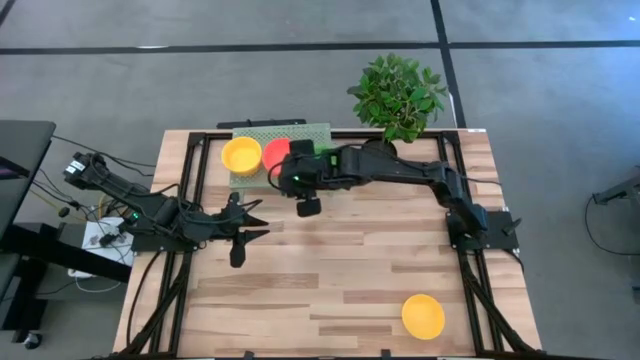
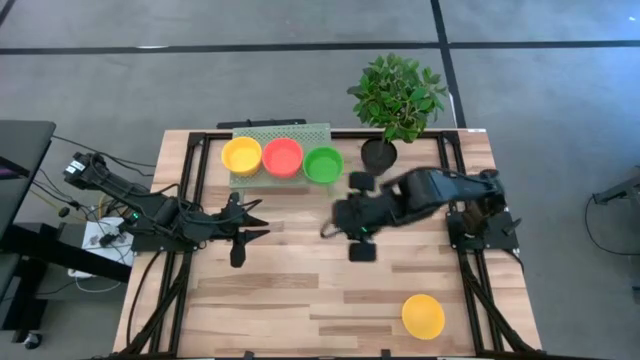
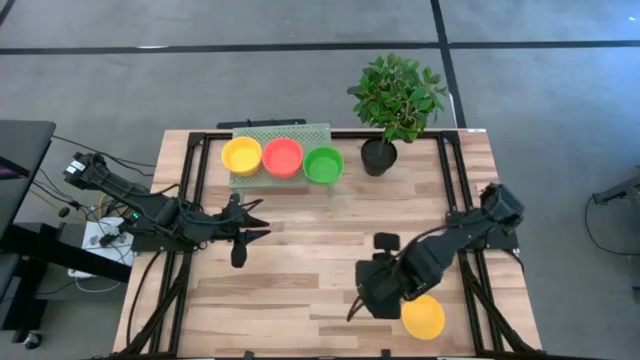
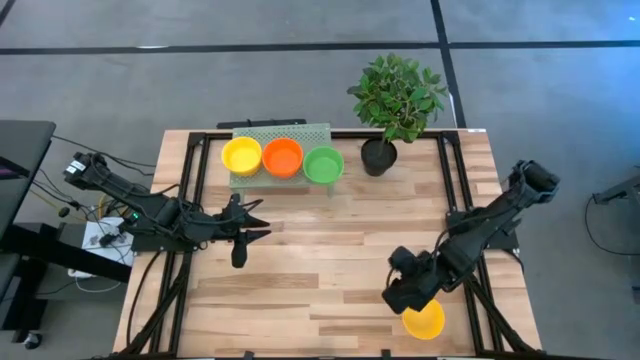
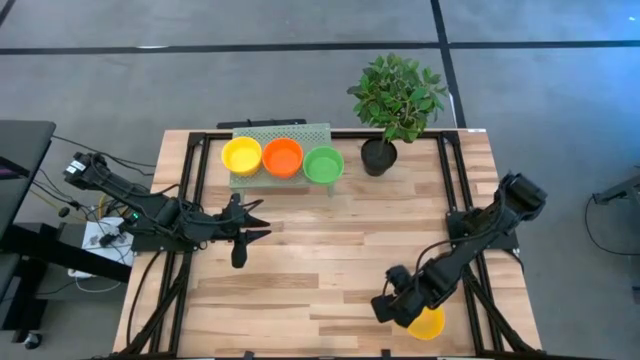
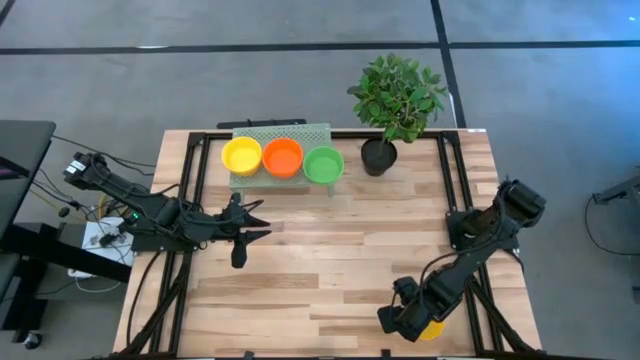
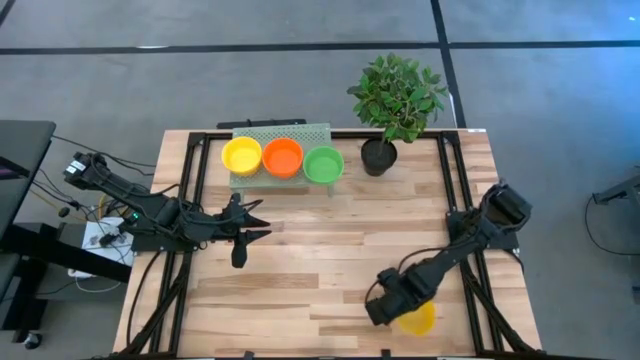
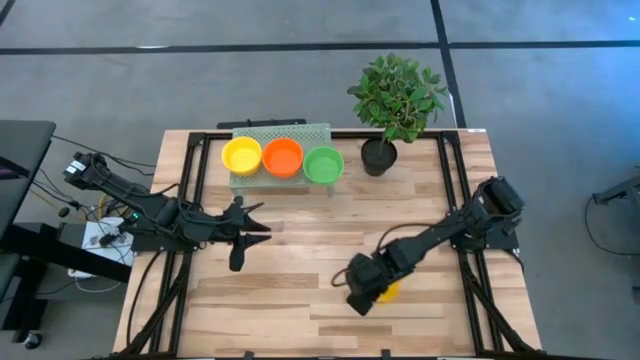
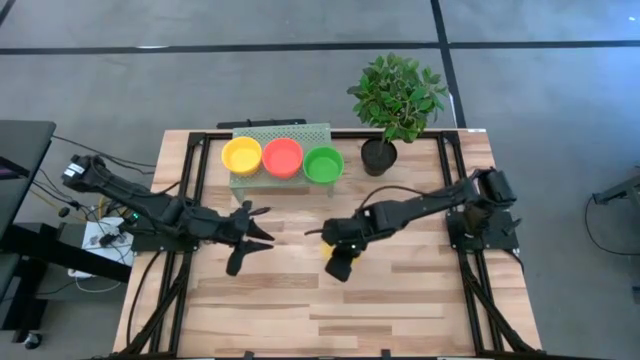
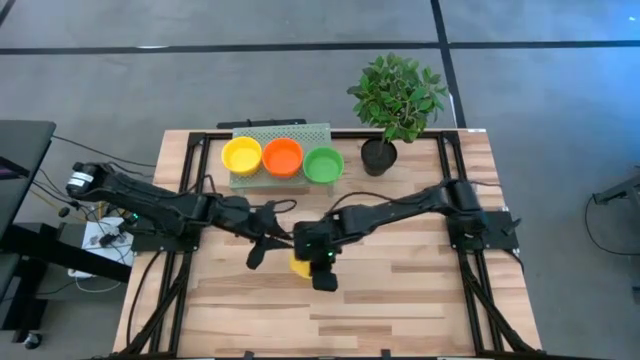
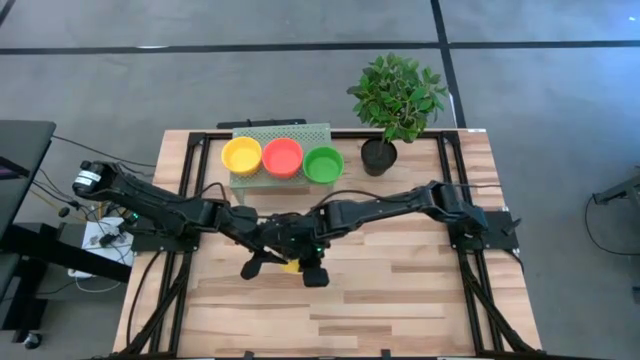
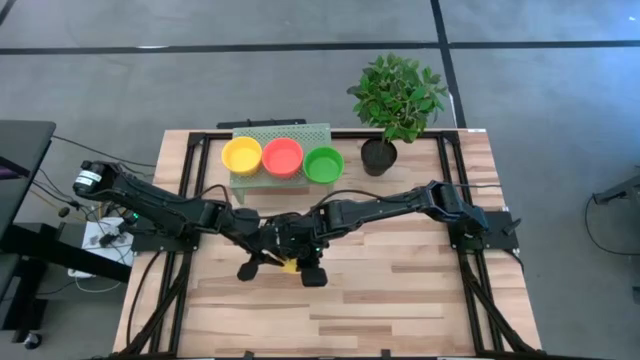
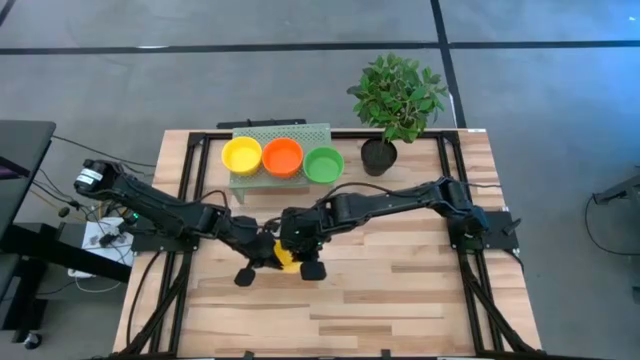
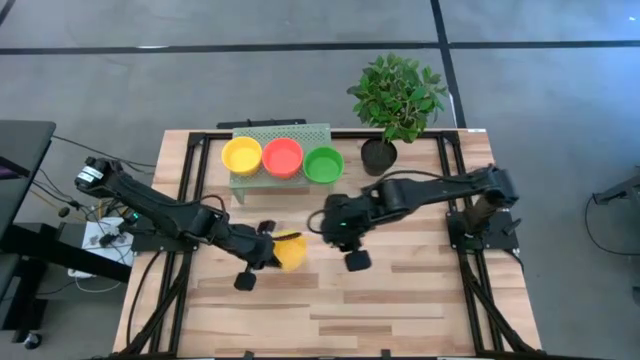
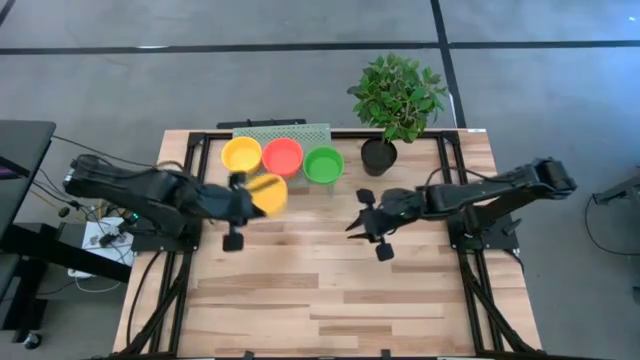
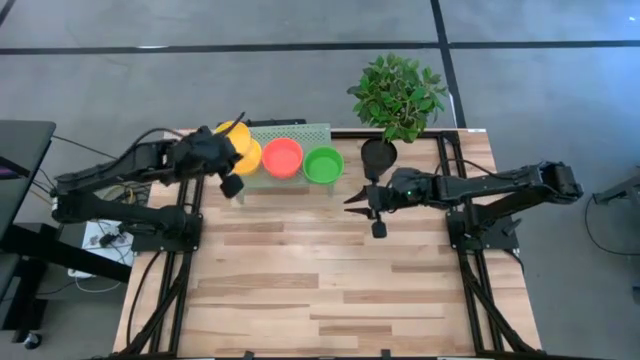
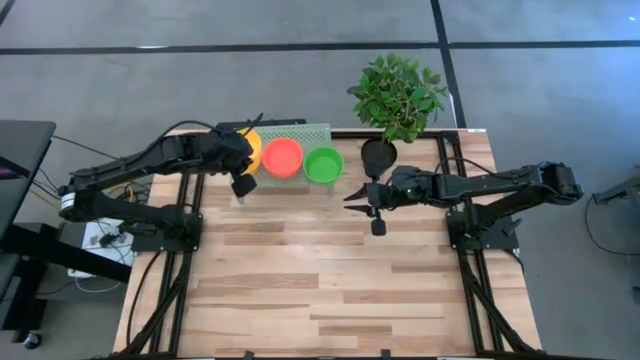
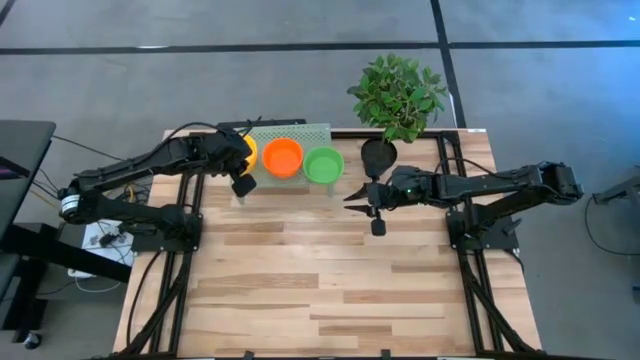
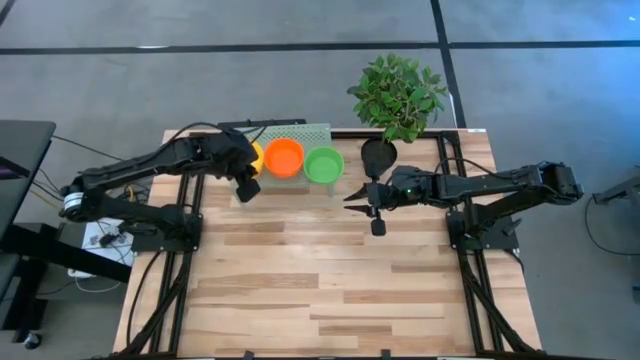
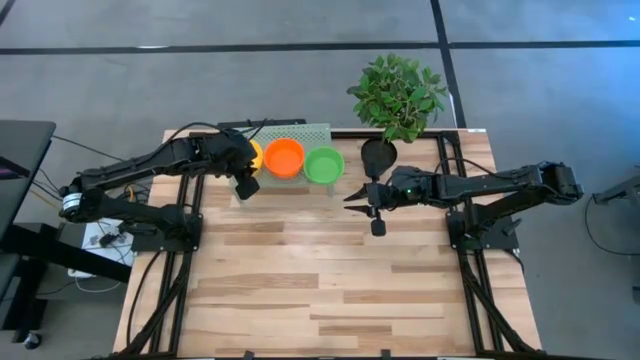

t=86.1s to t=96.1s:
Task: Pick & Place Mini bowls
Stack the yellow bowl on top of the yellow bowl on the shelf

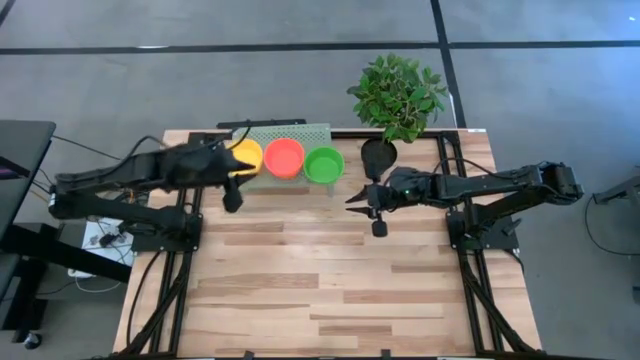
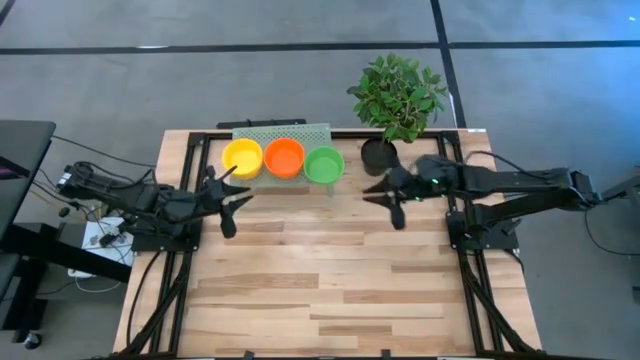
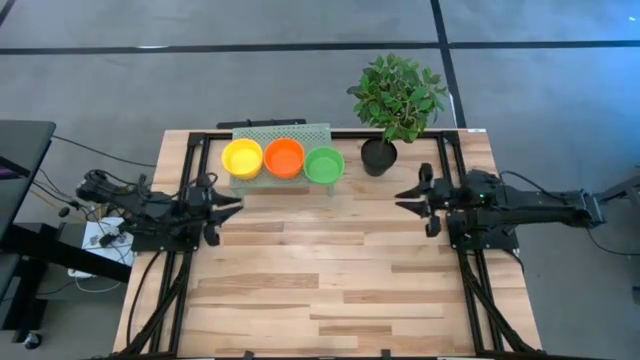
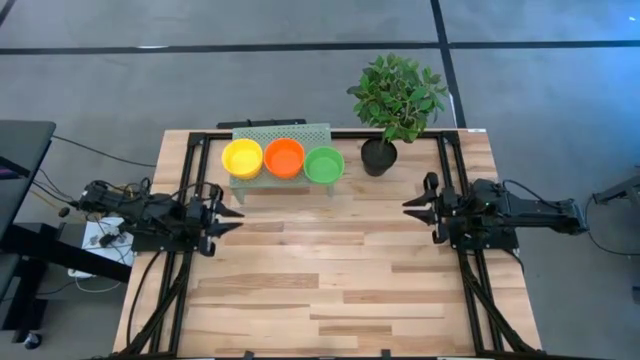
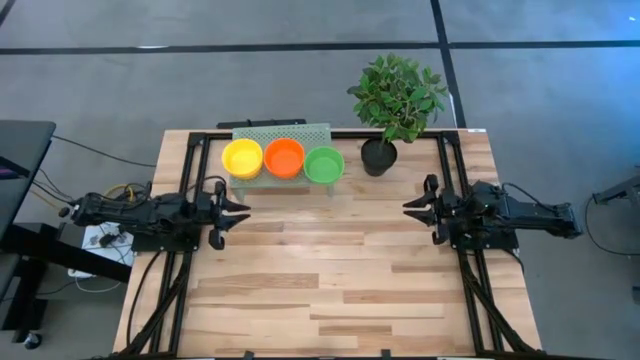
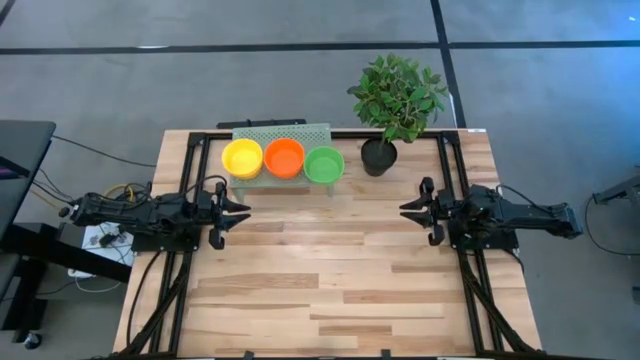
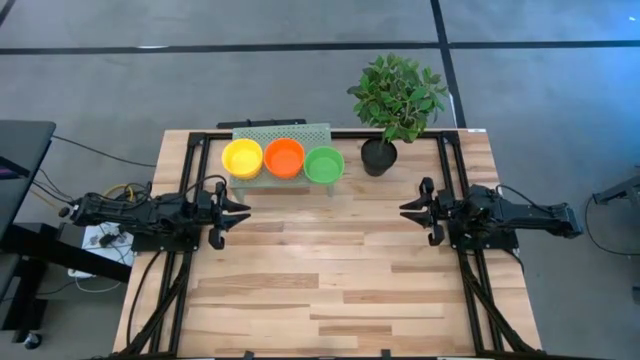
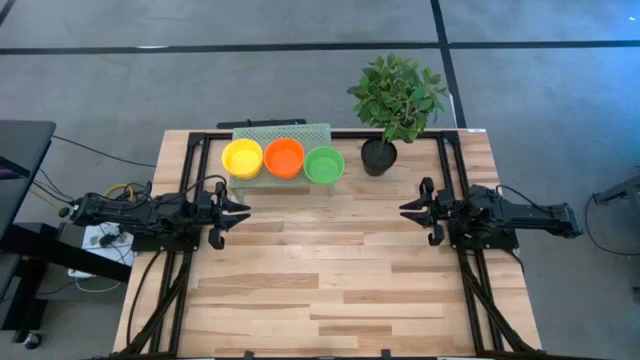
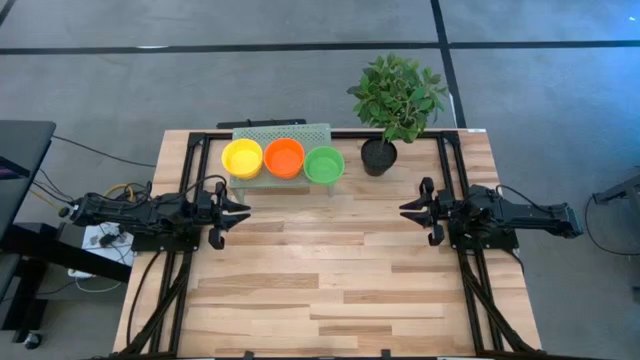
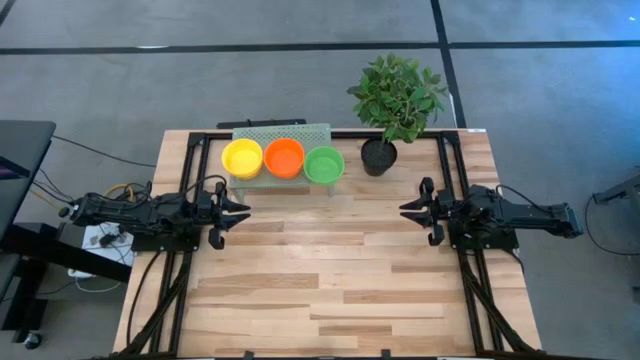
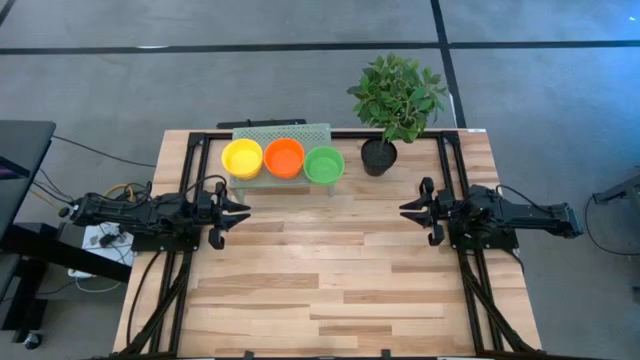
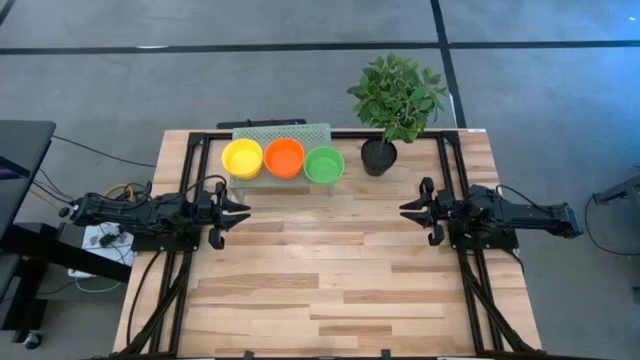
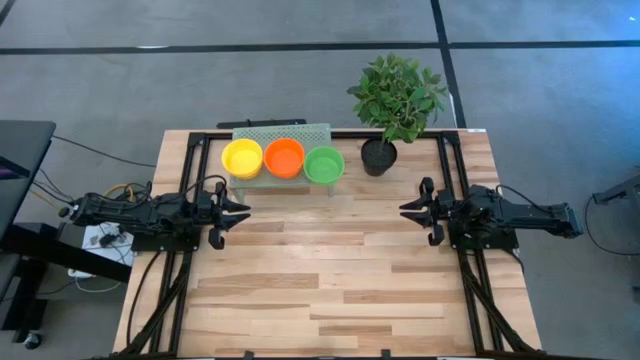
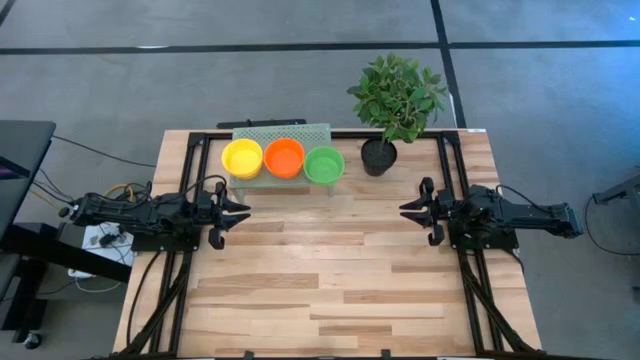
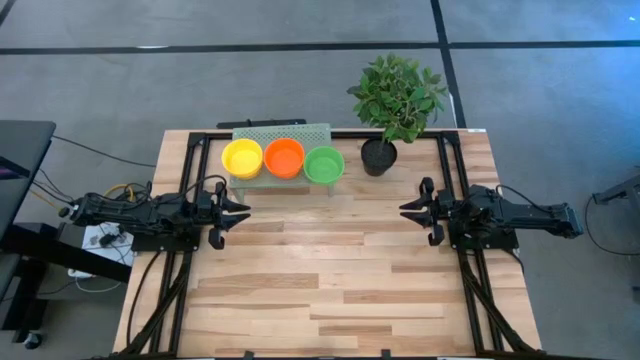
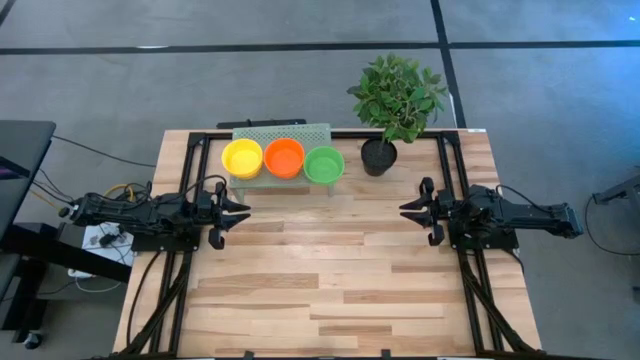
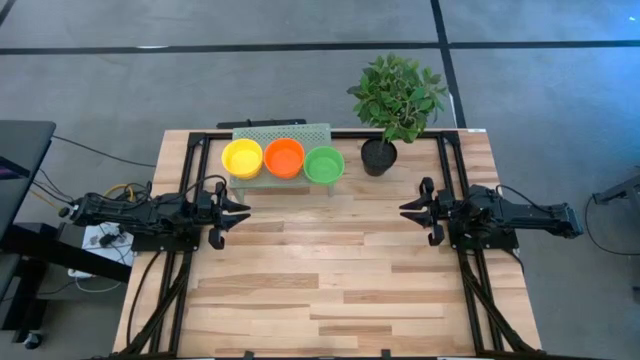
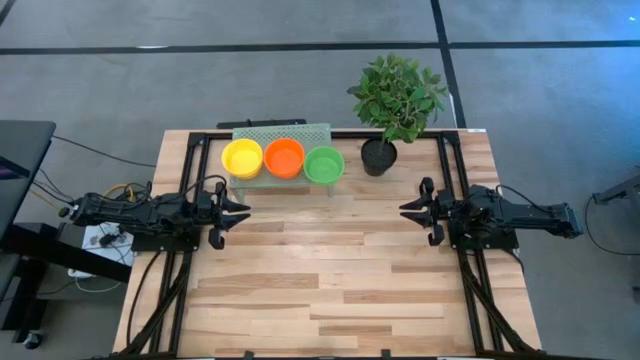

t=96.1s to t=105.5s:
Return to Home Position

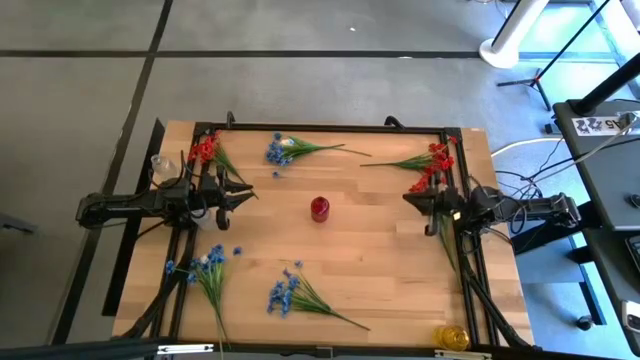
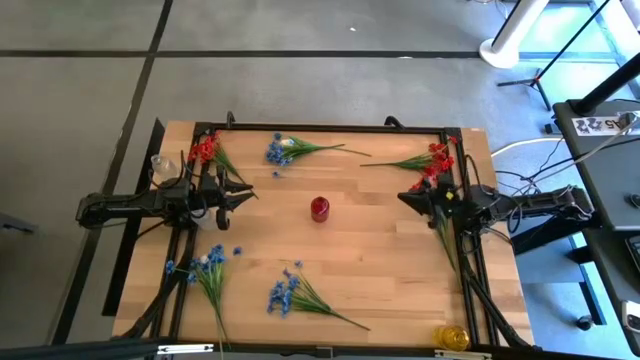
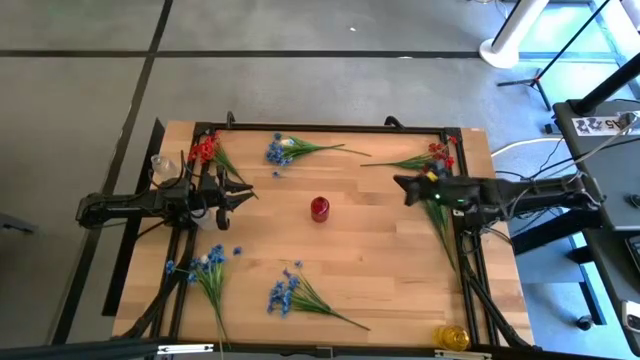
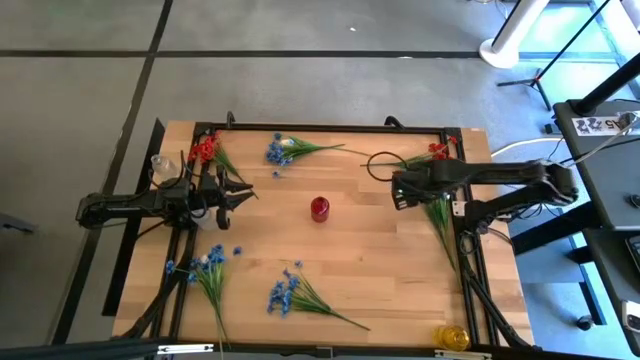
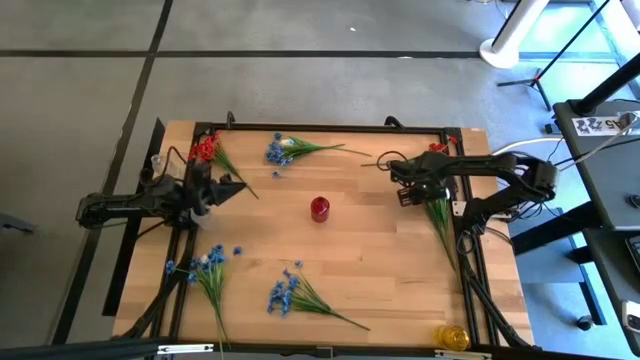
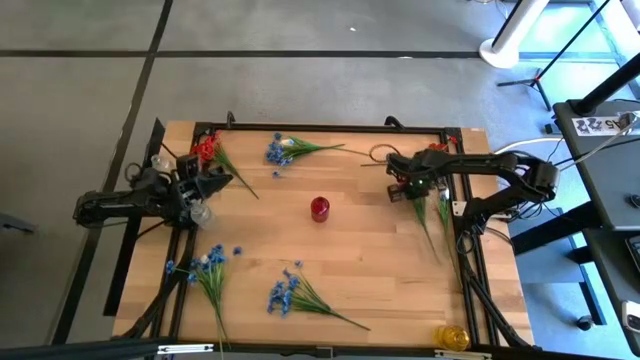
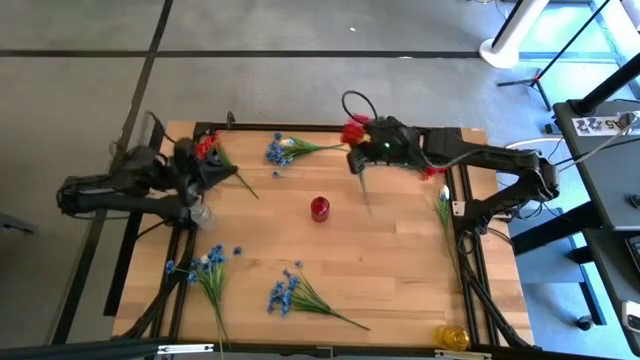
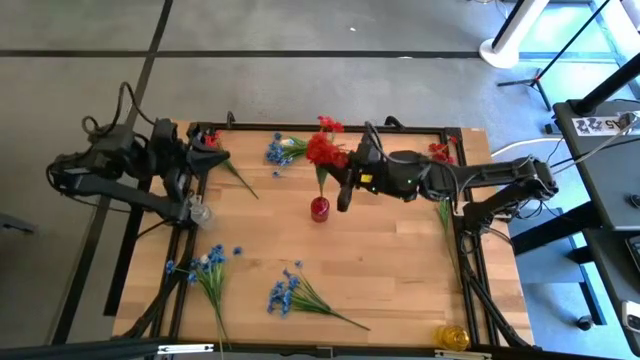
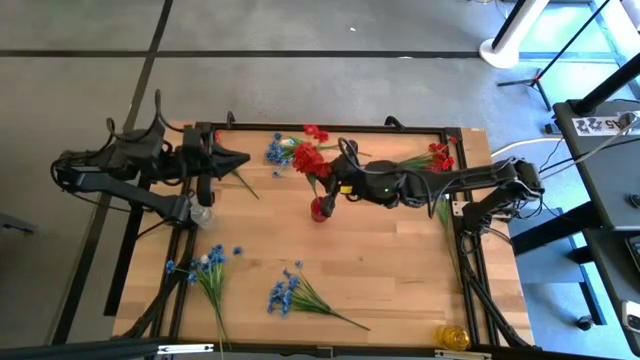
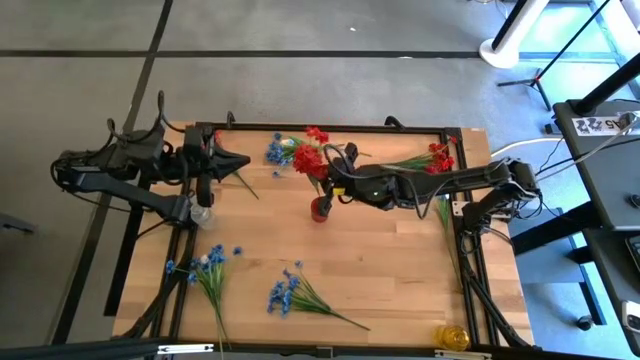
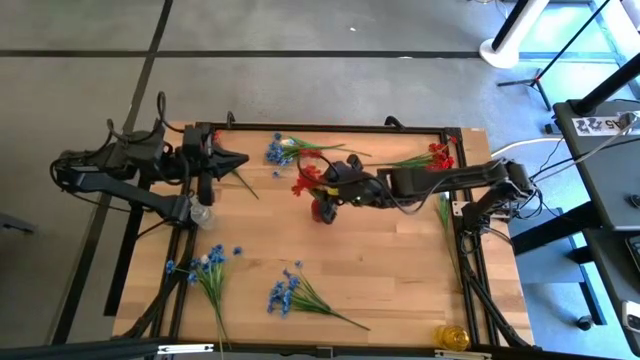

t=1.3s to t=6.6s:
Task: Sort flowers into vase by color
Put the bottom right red flowers into the red vase
